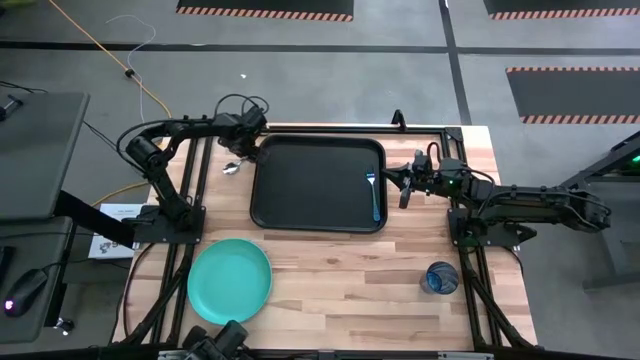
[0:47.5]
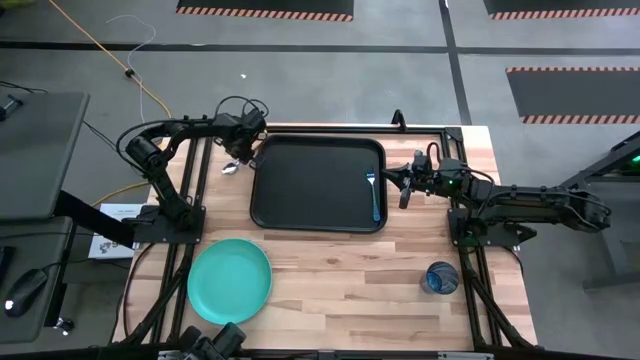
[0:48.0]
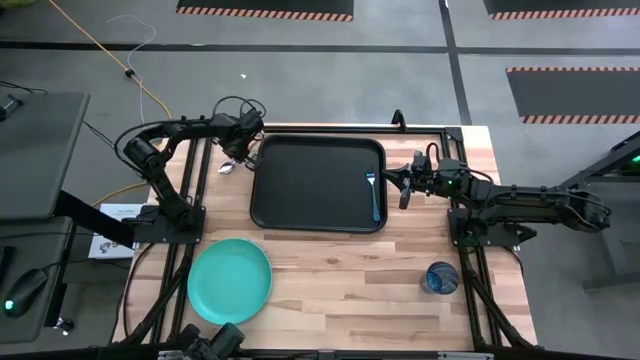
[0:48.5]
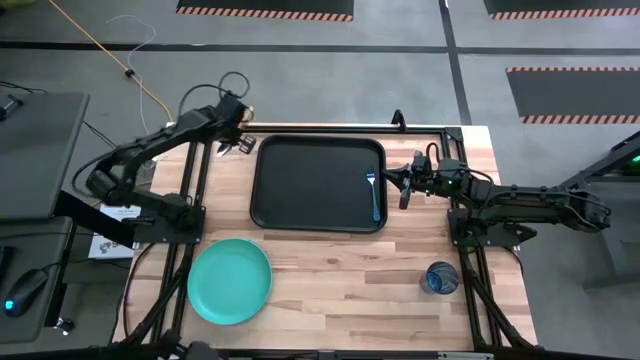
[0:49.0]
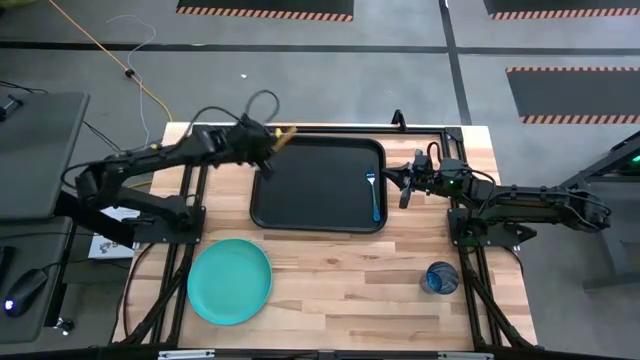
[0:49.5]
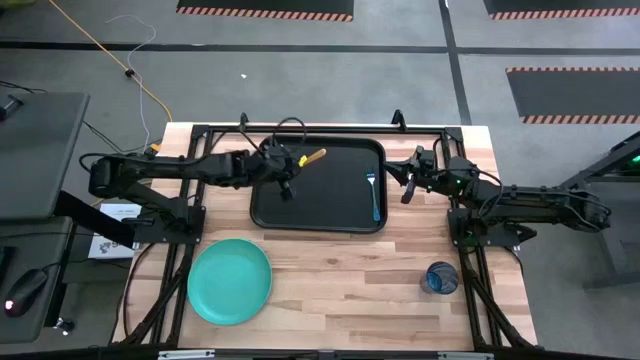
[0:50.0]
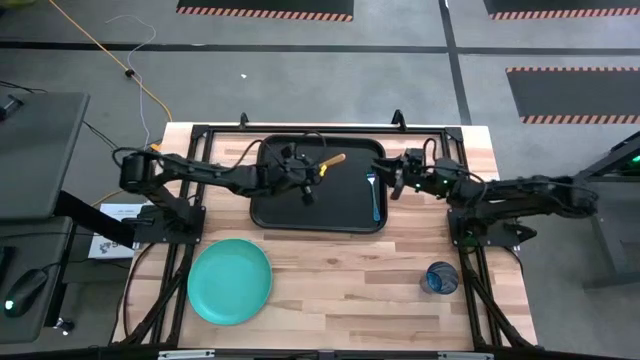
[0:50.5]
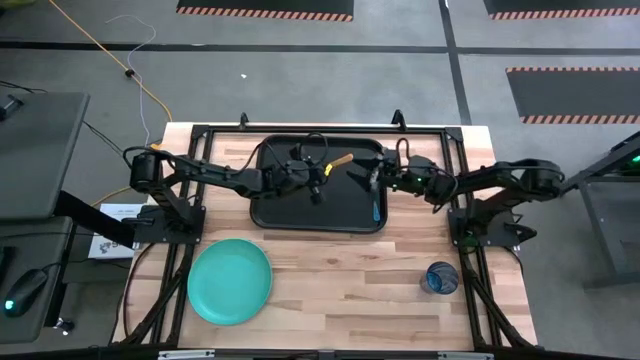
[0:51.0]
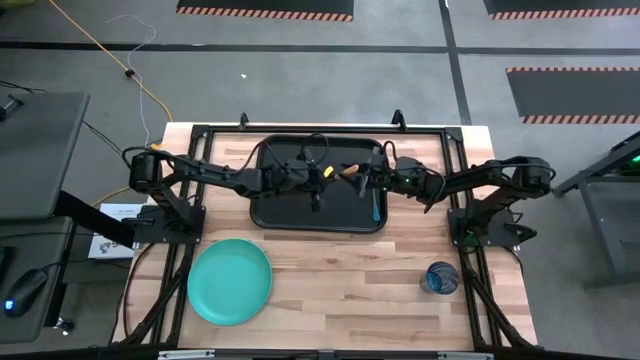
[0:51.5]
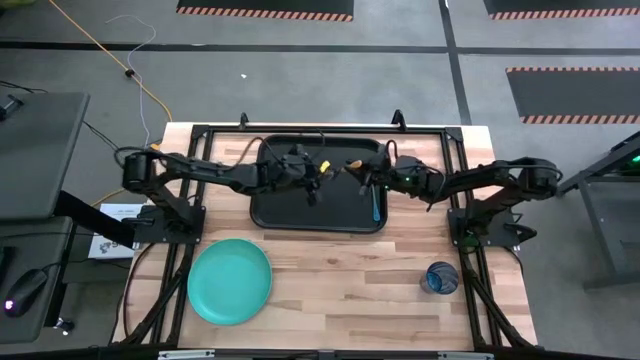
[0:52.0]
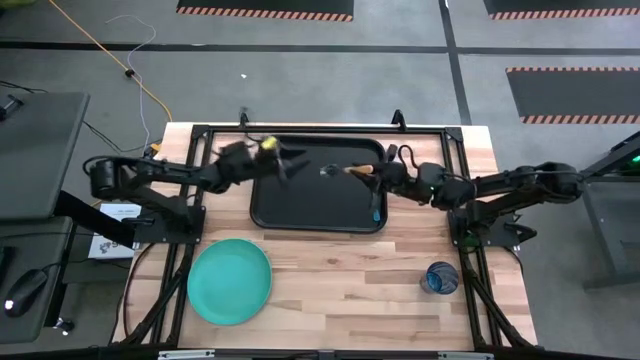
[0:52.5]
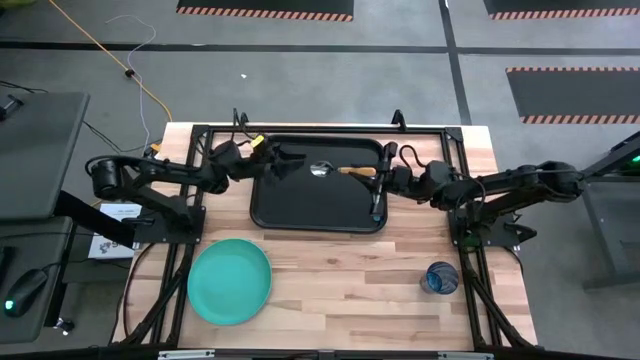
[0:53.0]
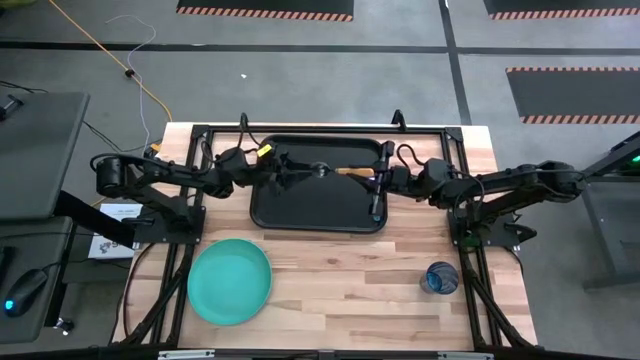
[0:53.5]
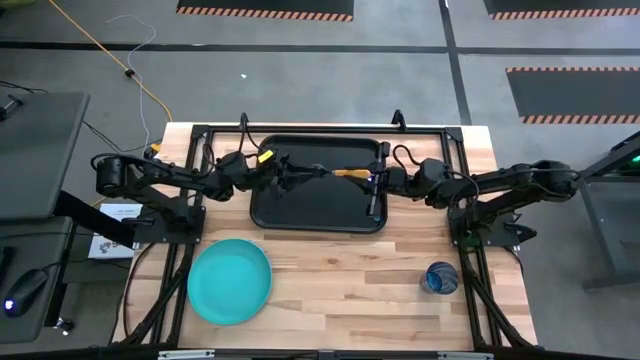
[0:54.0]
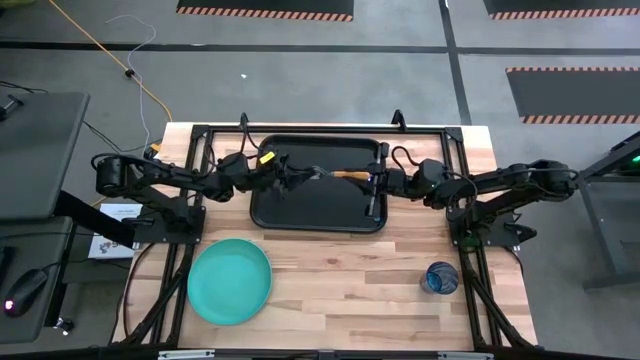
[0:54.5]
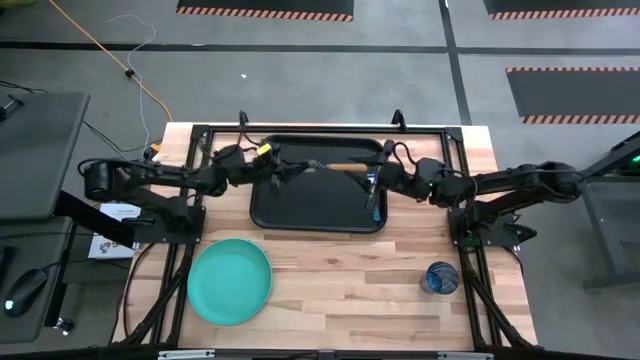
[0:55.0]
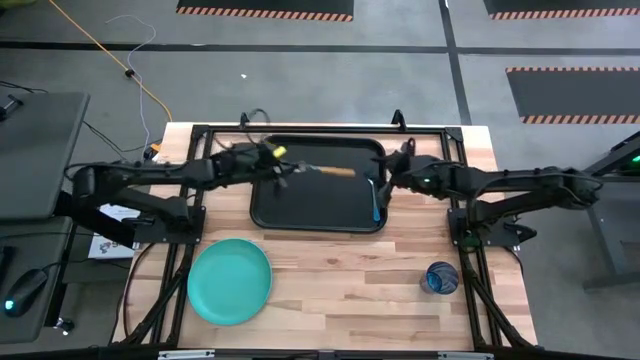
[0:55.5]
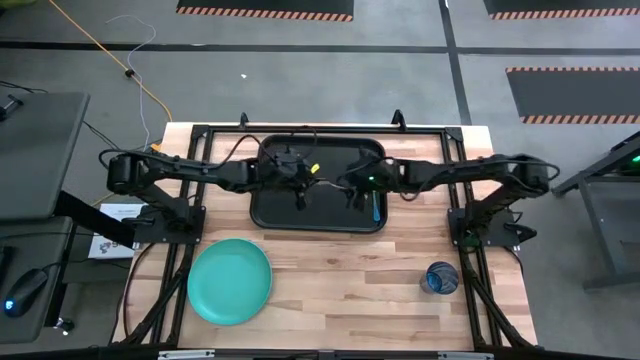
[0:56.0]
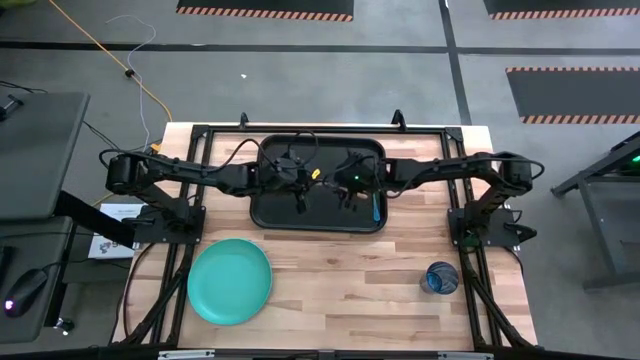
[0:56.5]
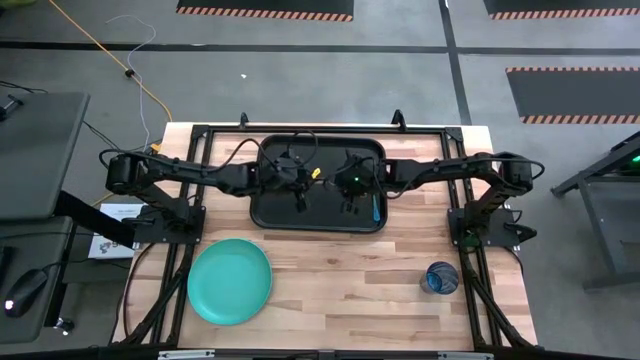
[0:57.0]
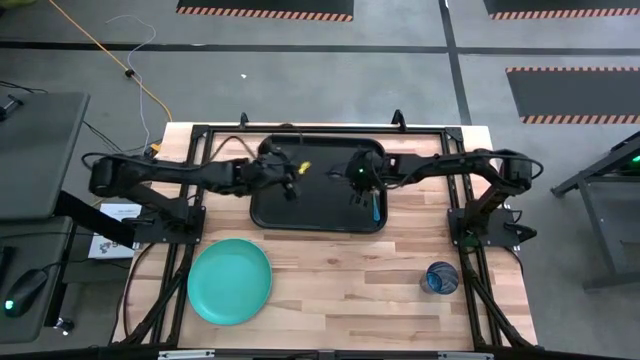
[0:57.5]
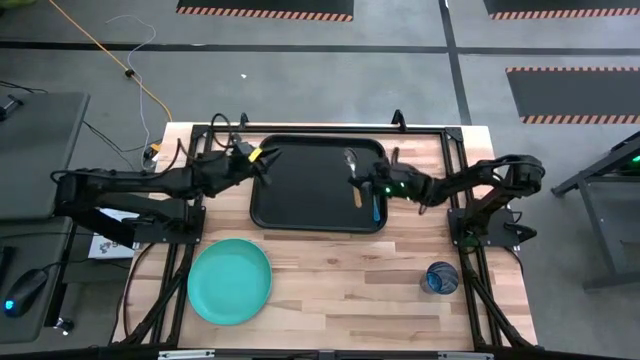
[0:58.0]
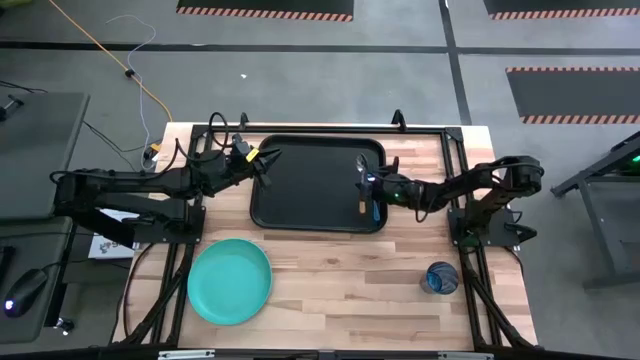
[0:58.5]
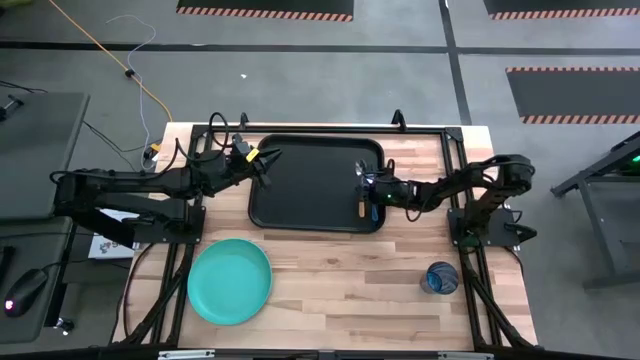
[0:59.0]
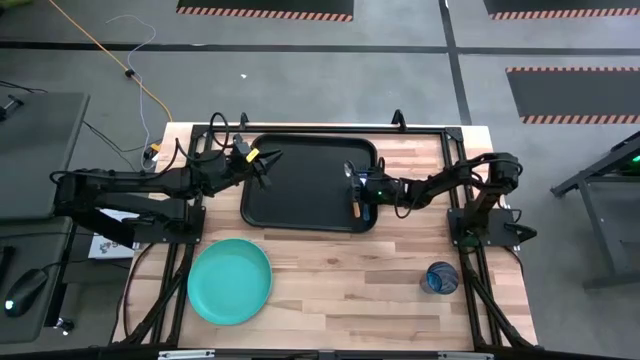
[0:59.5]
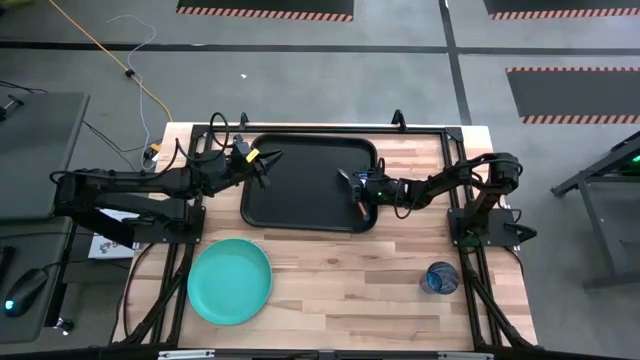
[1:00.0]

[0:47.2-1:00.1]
Task: Pick and place plate/cup/fork/spoon on tray
Put the yellow spoon on the black tray to the left side of the blue fork

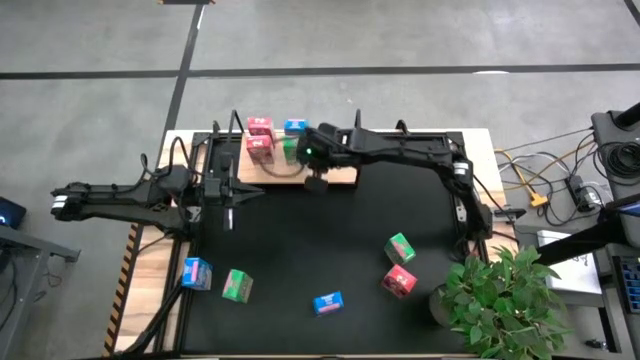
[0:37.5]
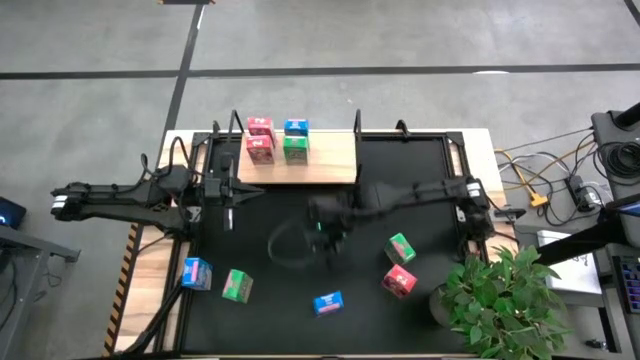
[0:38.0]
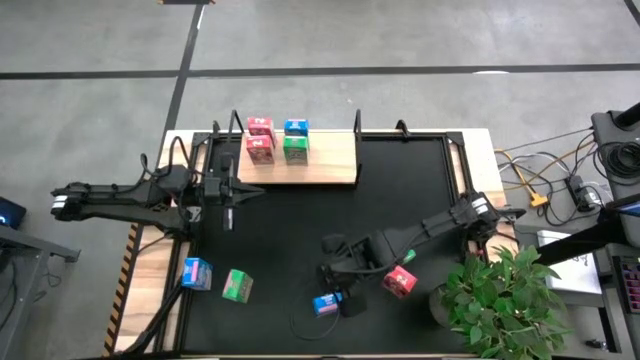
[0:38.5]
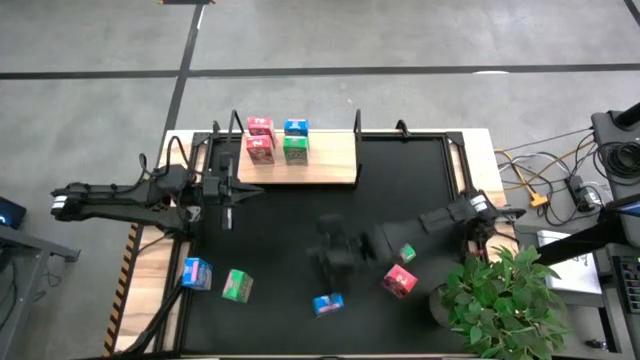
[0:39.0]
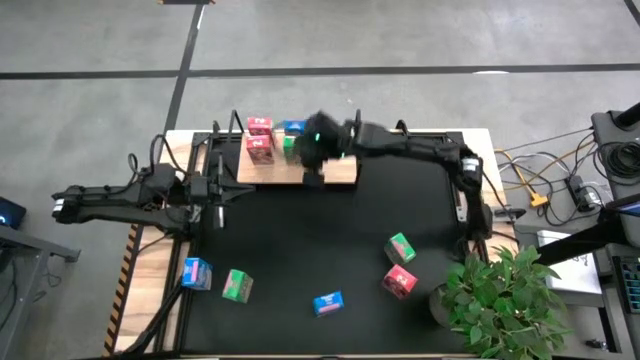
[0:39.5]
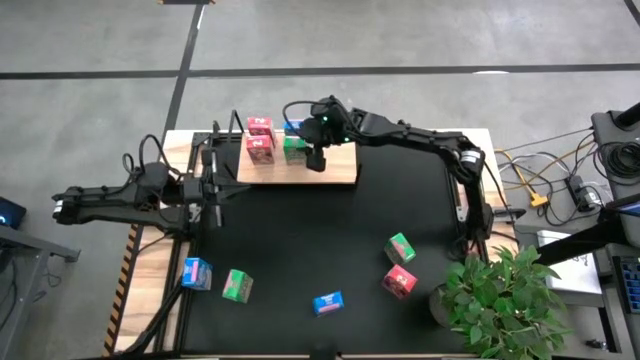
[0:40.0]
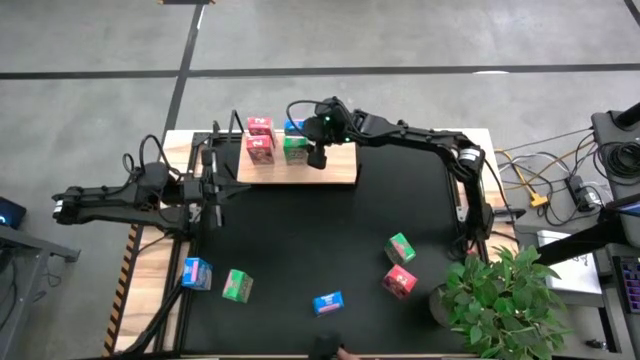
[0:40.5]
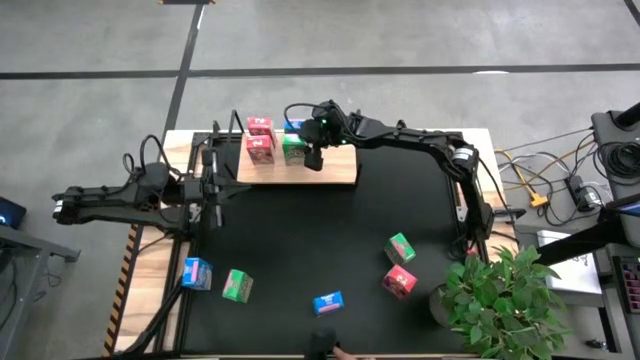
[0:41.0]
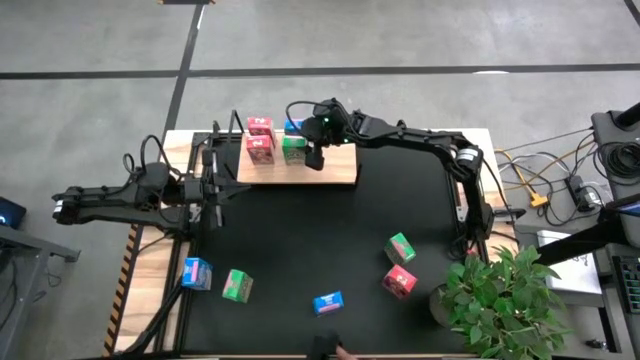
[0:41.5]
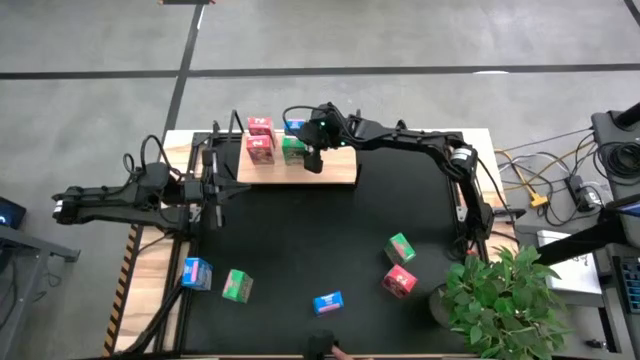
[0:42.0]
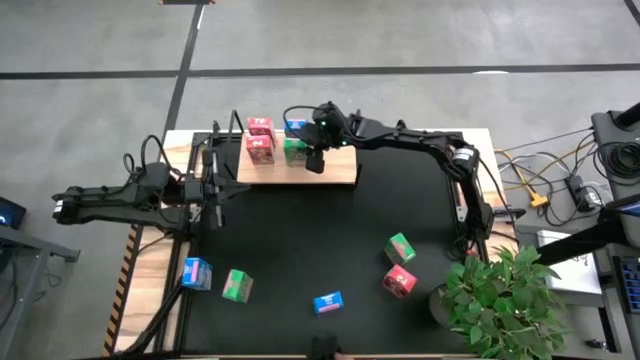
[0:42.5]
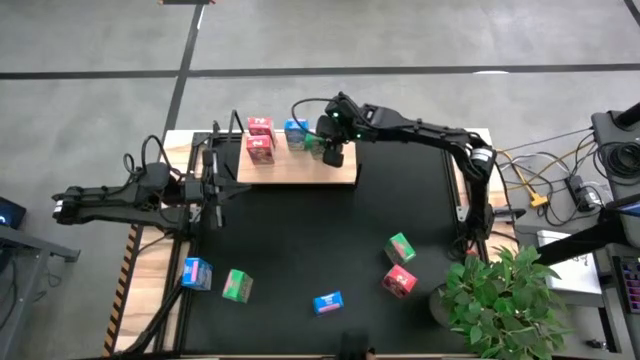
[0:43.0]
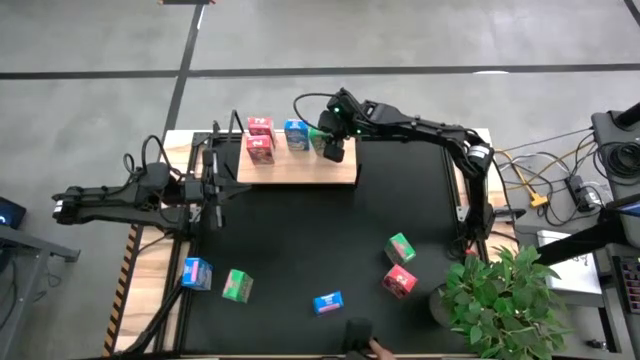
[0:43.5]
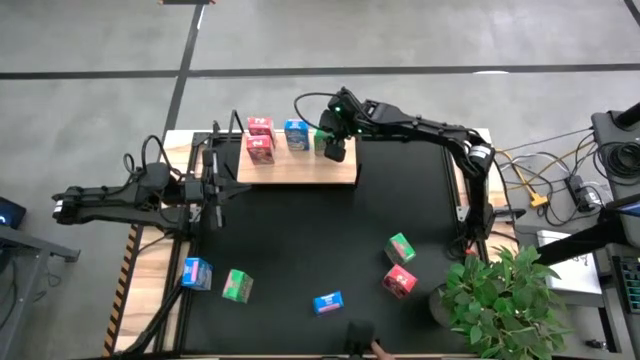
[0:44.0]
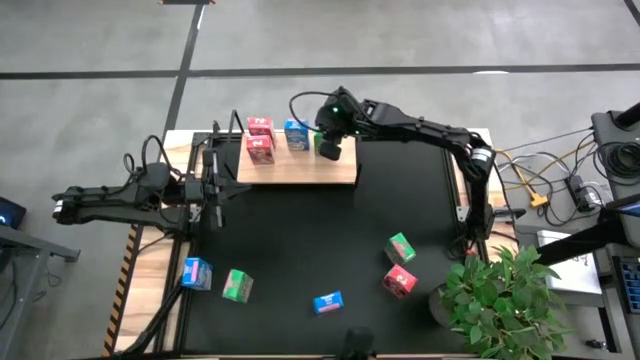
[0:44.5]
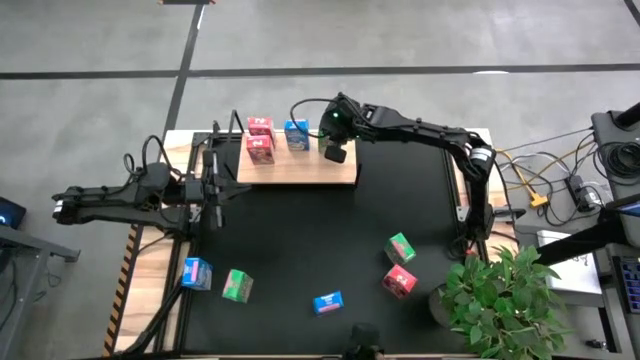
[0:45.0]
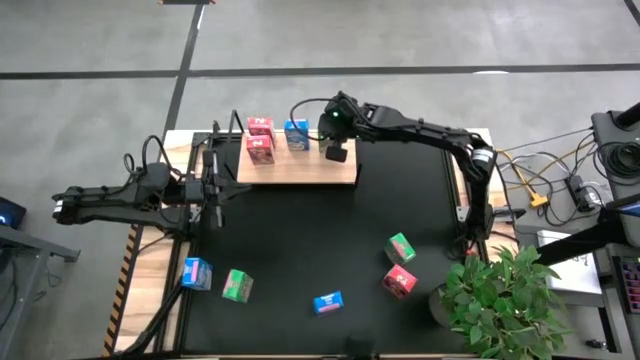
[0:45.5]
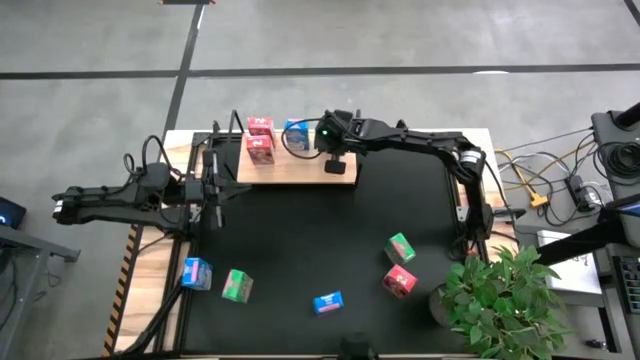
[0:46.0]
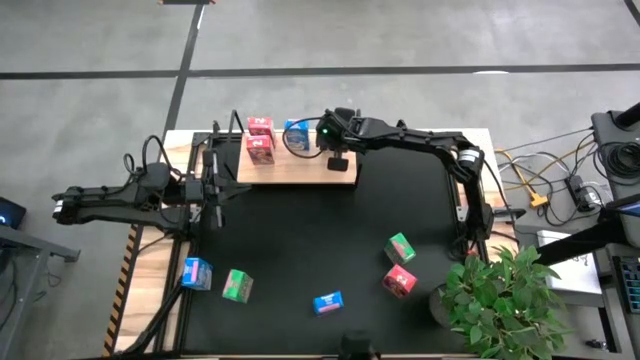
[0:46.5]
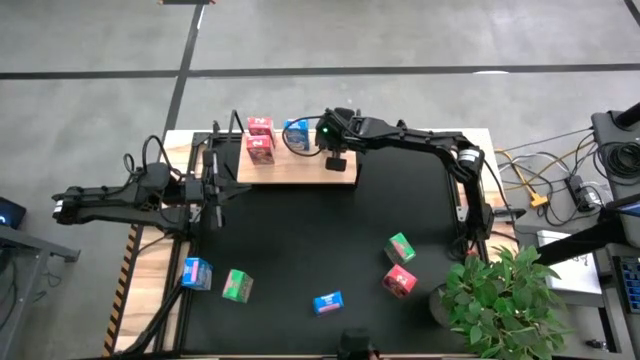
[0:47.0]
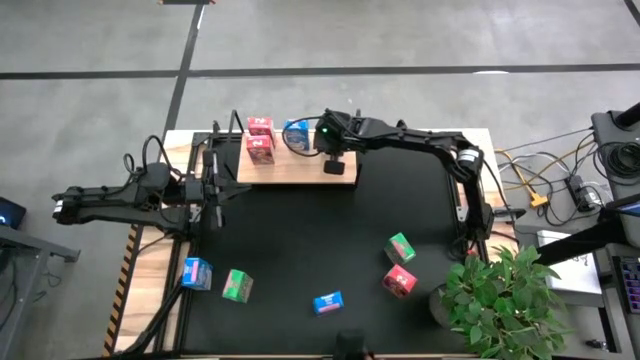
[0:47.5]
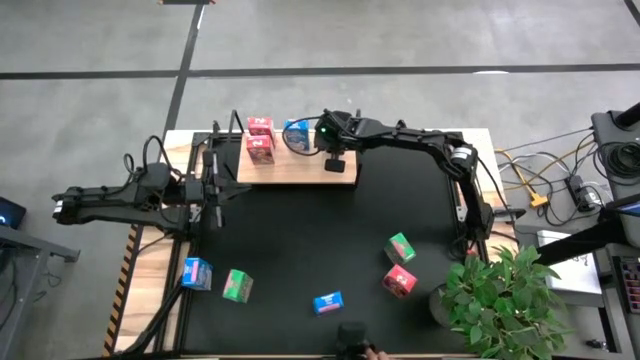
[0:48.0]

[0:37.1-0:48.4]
Task: Stack cereal on shelf
Put the top green cereal box on the shelf
